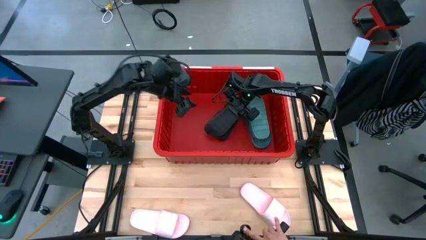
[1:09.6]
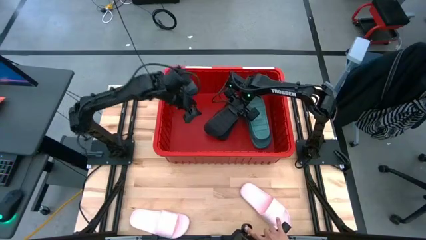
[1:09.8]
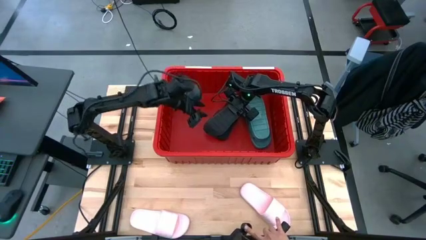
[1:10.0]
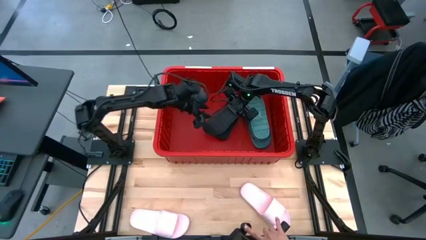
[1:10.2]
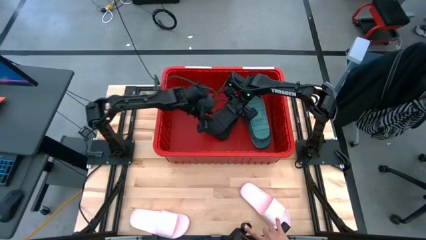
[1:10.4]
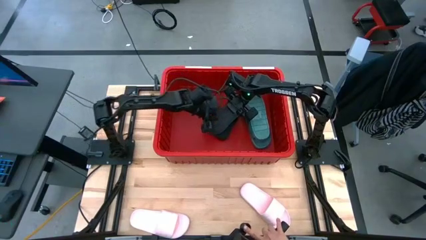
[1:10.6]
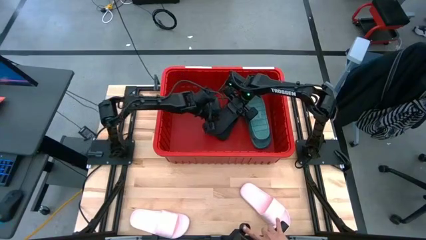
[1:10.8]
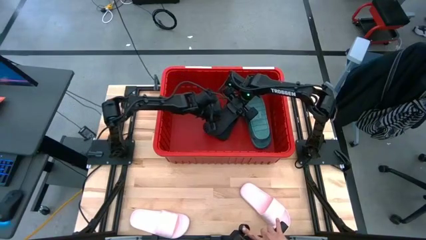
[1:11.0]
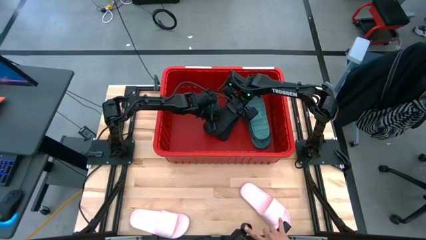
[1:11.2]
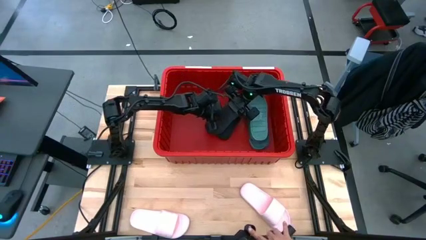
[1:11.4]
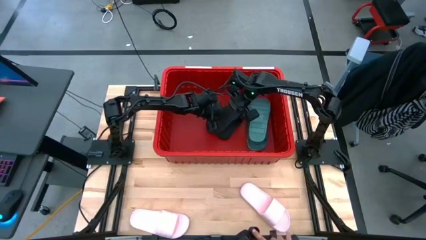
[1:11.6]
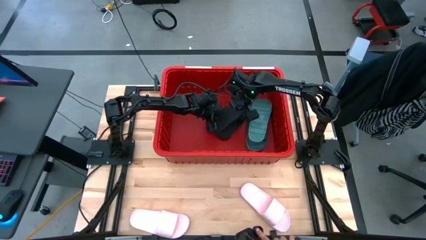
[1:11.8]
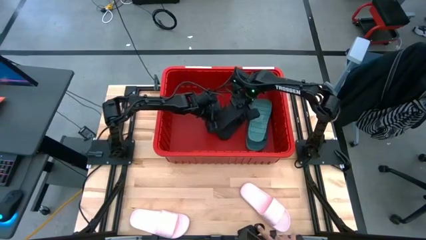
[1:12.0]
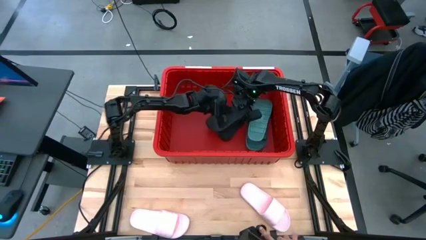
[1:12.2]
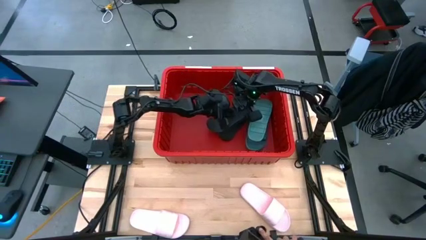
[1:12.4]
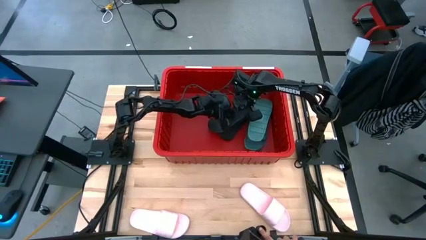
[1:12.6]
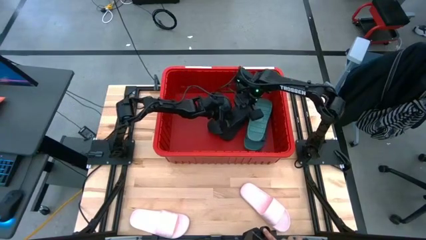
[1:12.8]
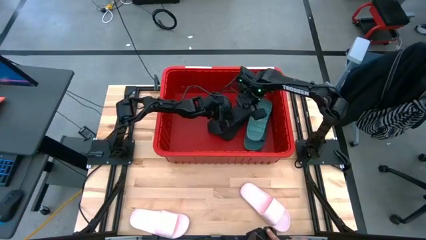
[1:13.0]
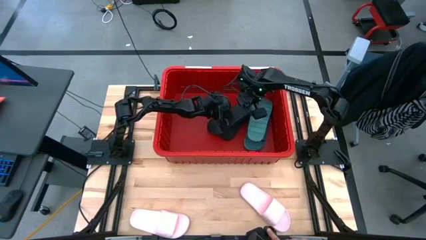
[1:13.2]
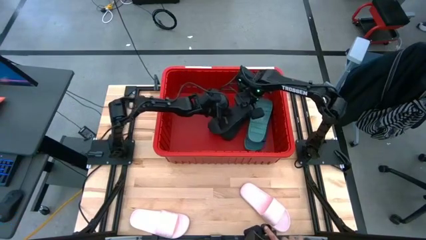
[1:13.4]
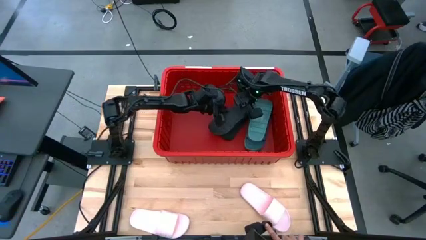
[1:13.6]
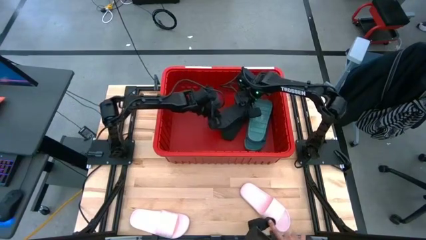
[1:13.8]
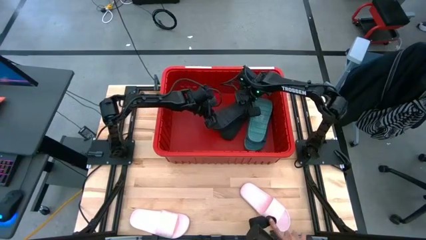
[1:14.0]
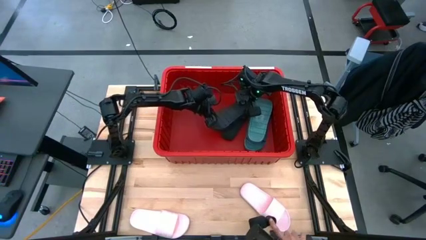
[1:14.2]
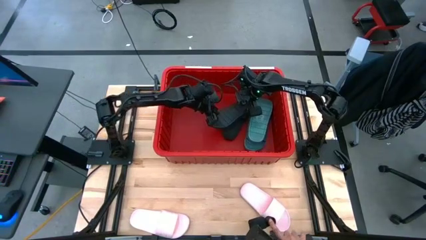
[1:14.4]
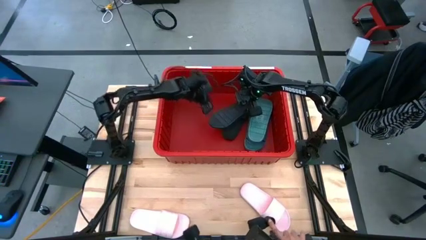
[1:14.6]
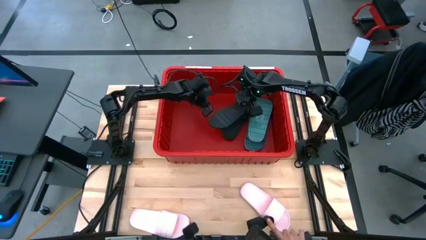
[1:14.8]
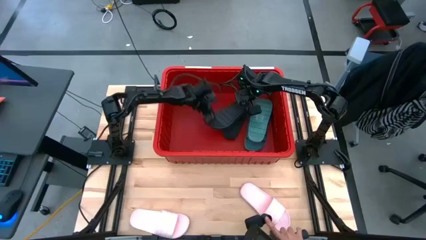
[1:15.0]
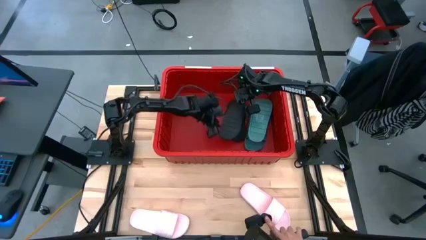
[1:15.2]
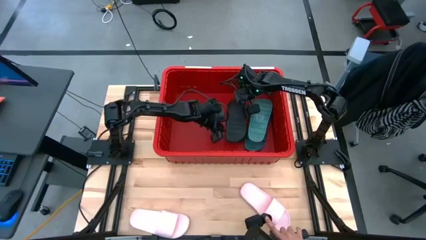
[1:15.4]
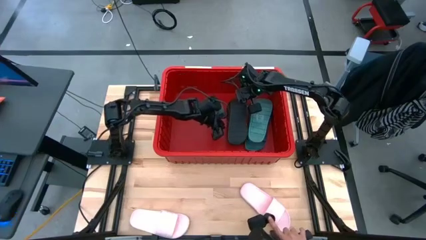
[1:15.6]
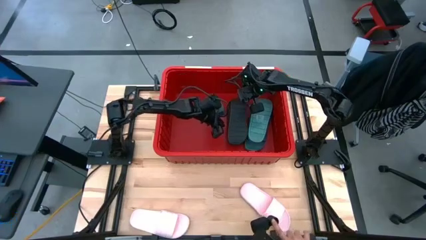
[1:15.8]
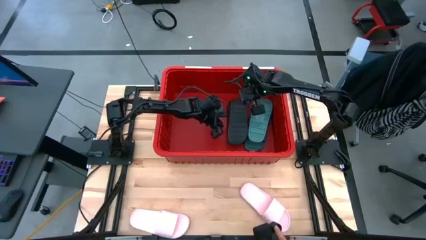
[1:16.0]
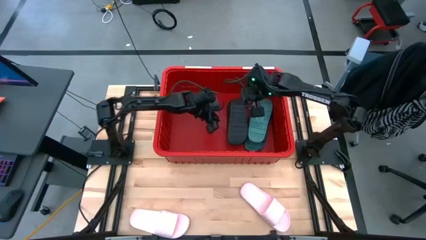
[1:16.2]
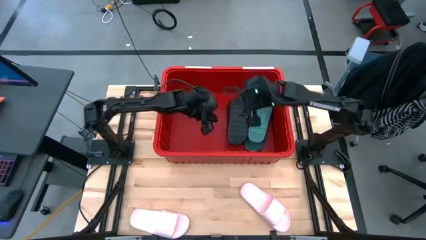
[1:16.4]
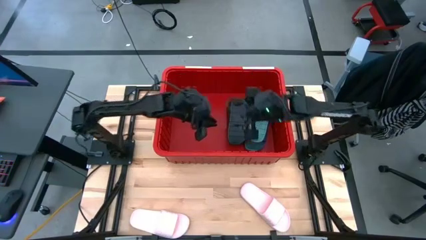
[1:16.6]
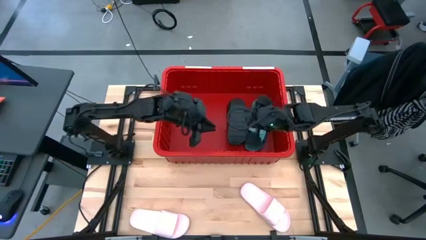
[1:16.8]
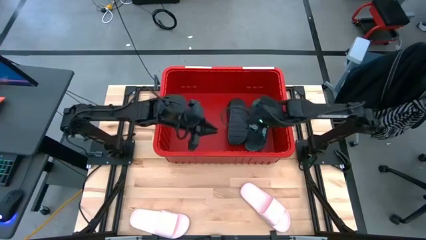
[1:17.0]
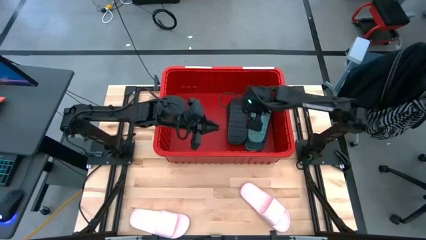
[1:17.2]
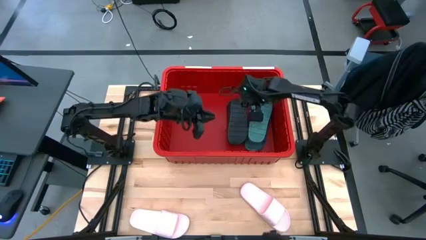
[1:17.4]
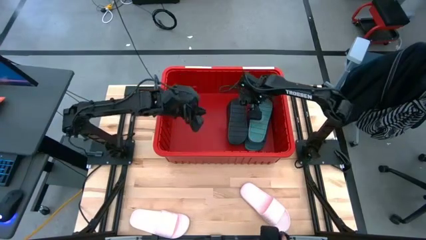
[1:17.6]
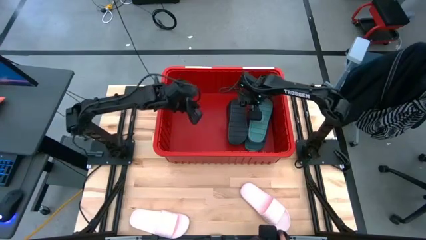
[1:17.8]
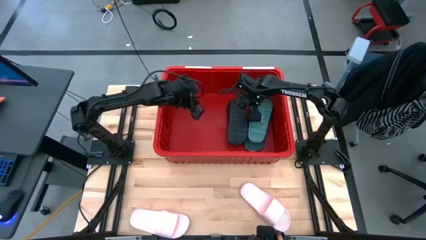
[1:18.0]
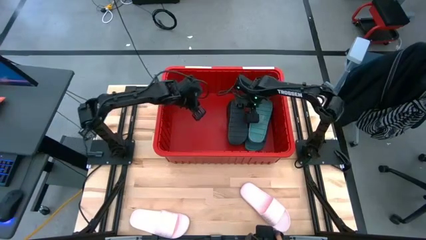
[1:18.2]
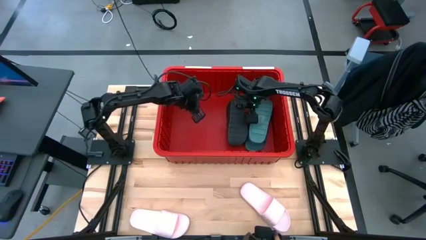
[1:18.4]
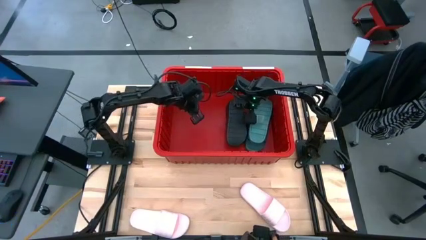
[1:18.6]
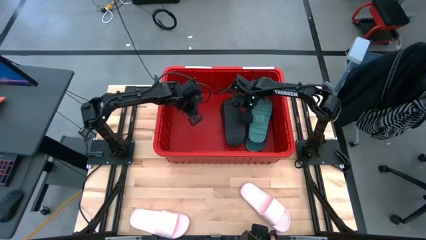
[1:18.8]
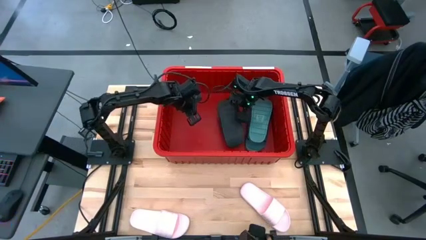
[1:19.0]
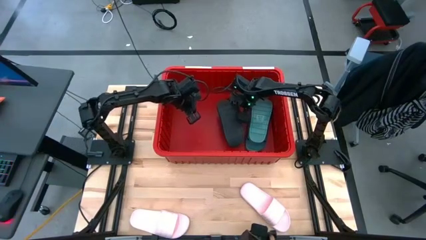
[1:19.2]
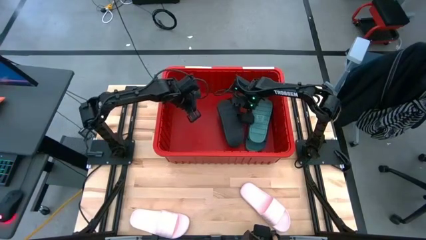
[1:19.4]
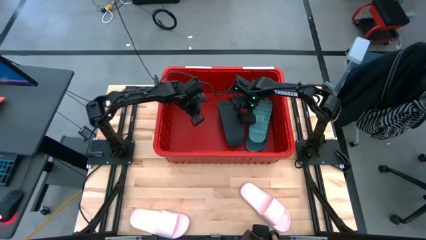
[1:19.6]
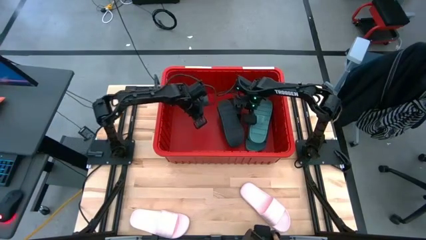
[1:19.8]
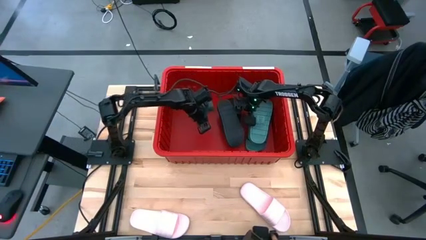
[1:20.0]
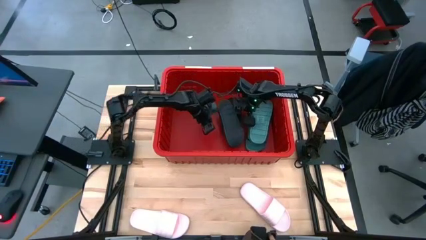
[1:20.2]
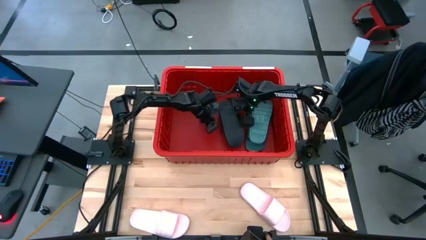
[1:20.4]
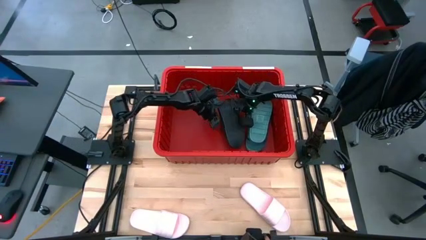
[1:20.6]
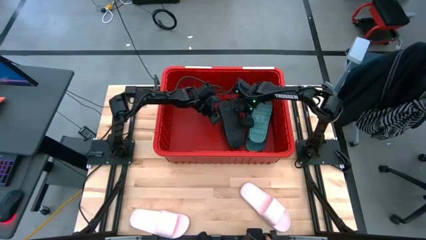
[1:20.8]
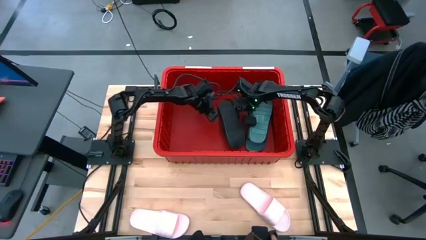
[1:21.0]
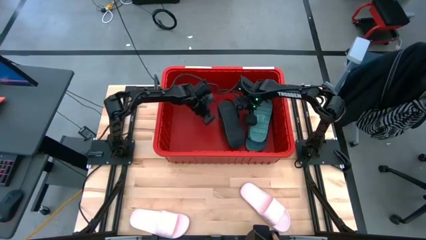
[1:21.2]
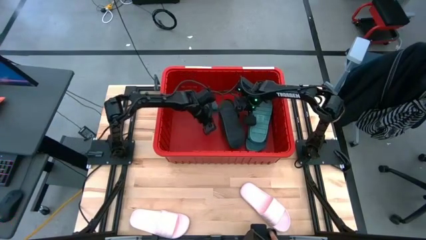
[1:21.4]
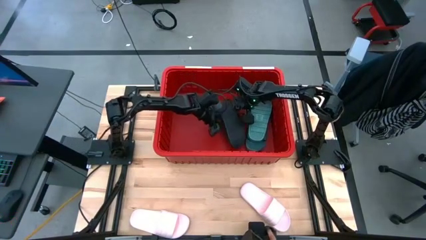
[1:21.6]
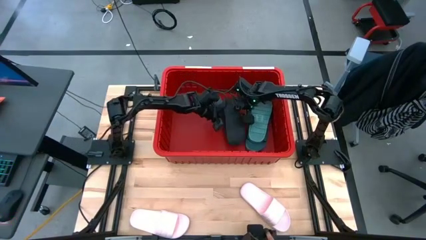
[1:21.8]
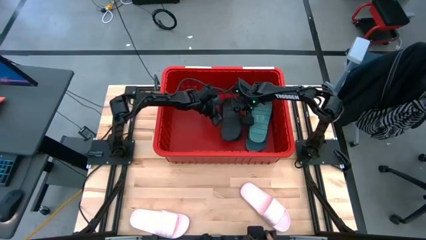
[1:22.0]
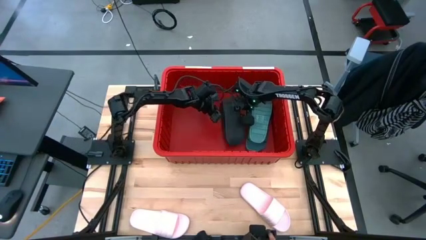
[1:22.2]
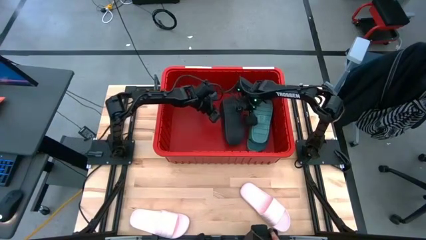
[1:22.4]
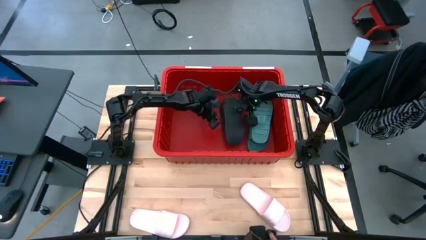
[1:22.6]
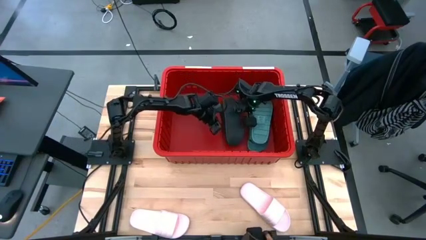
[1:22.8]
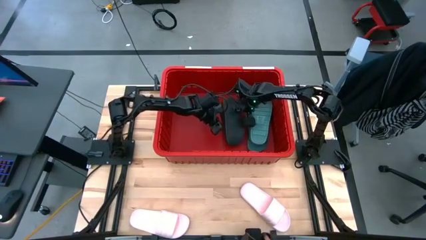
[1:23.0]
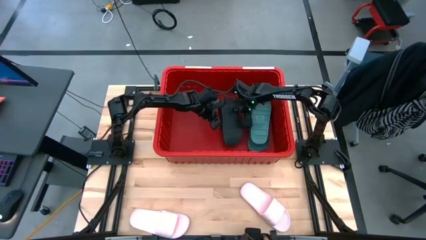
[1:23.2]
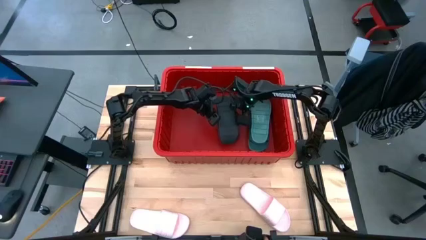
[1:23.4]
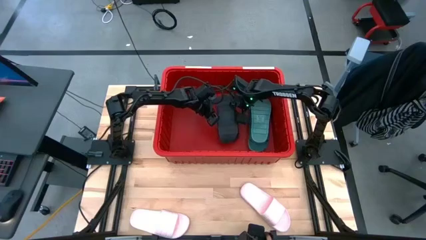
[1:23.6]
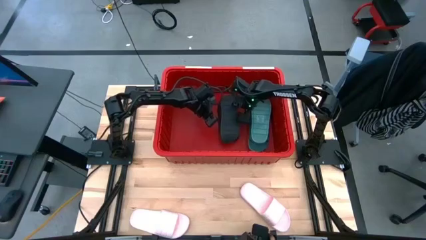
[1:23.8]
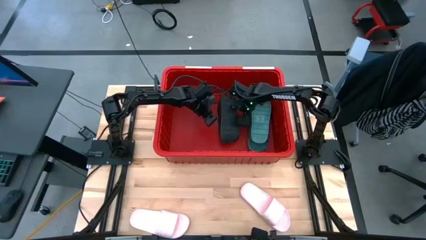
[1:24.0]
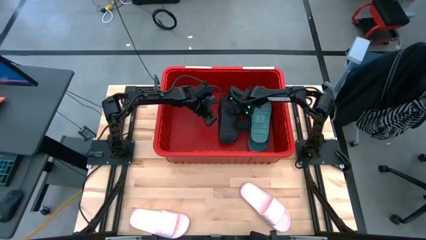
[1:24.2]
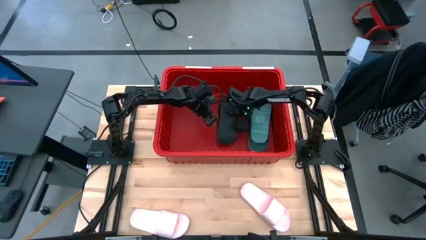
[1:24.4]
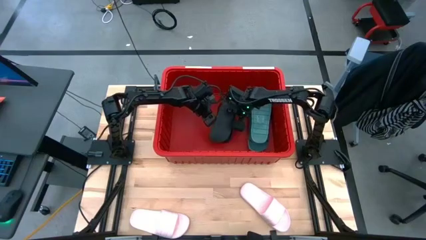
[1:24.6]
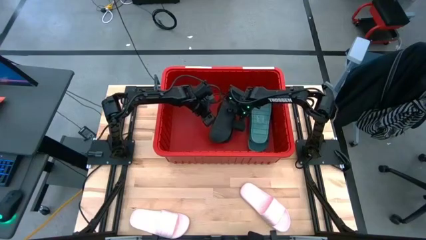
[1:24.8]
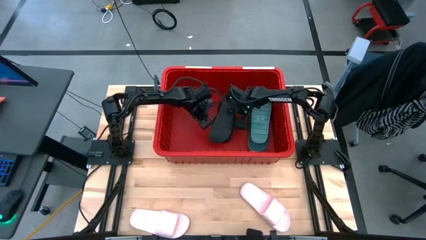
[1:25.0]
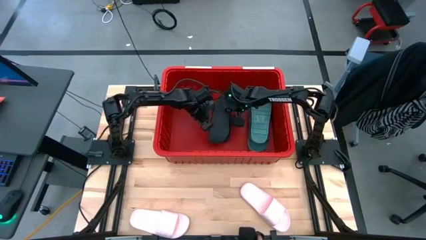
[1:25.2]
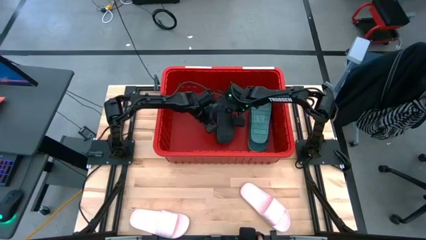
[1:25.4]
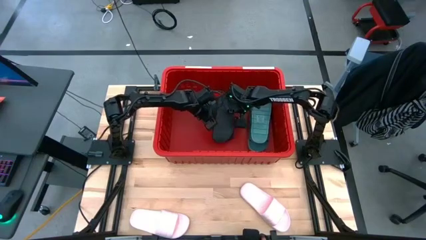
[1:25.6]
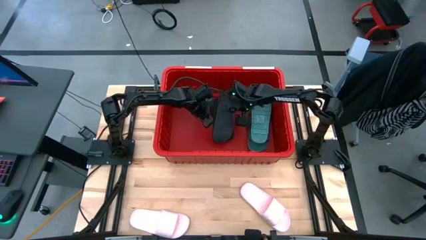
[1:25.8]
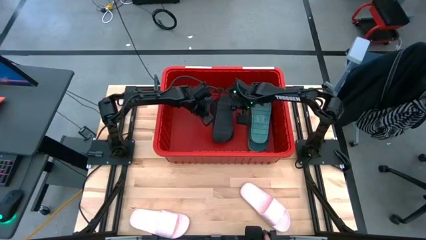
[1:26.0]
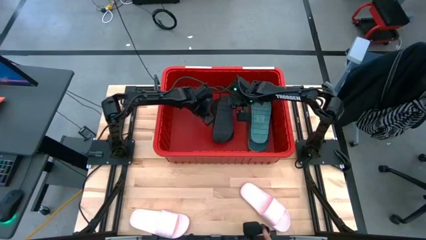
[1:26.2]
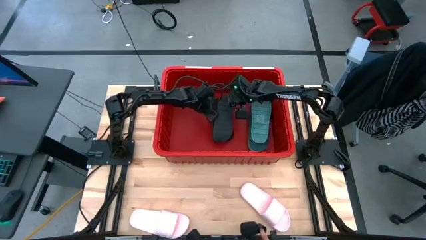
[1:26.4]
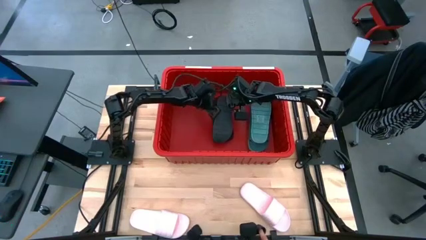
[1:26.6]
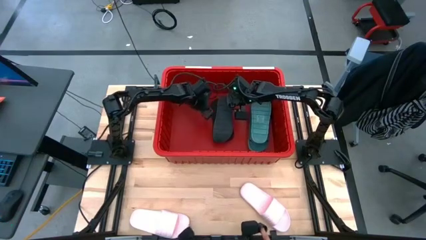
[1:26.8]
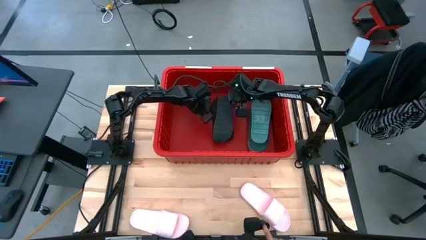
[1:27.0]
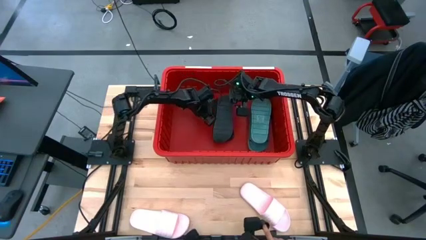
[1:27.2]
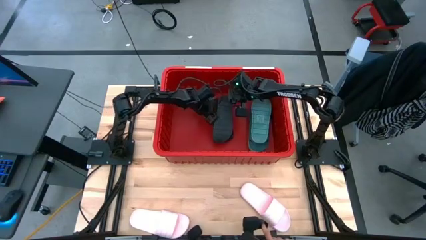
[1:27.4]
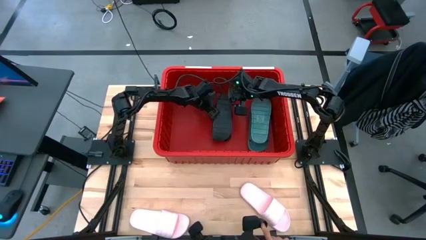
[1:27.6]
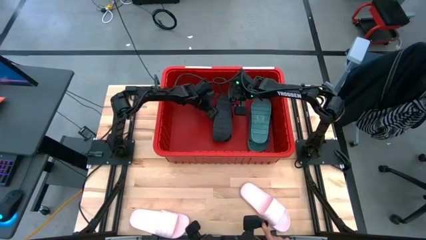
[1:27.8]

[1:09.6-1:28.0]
Task: Pick and place slides into bin
Put the black slides into the red bin
